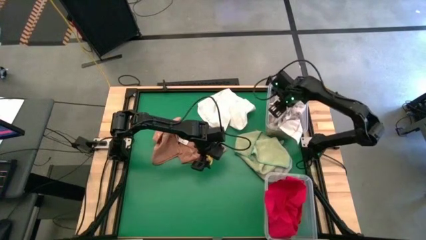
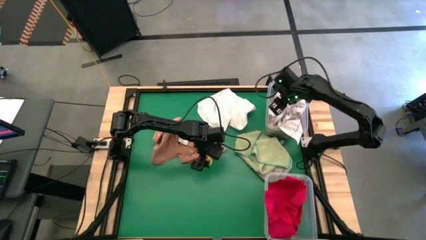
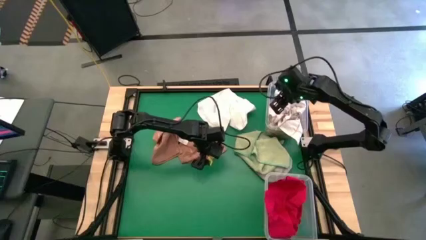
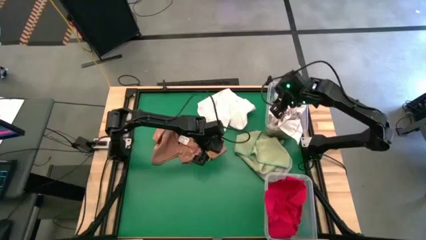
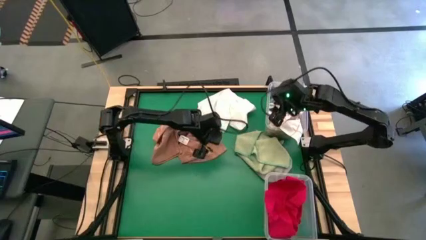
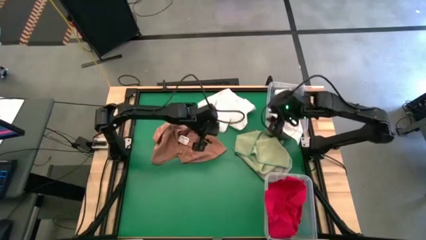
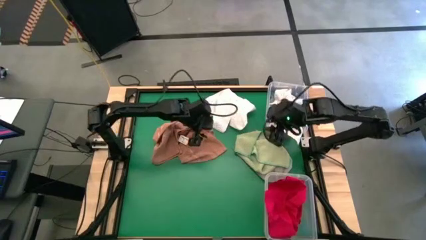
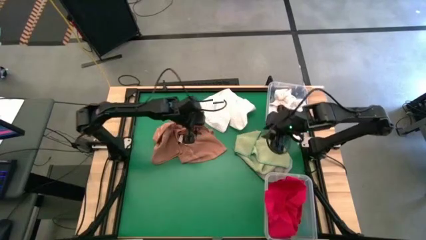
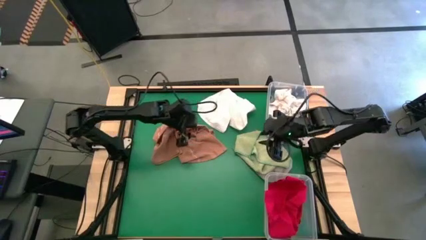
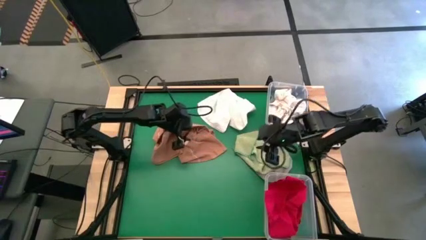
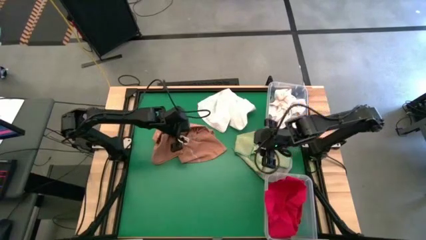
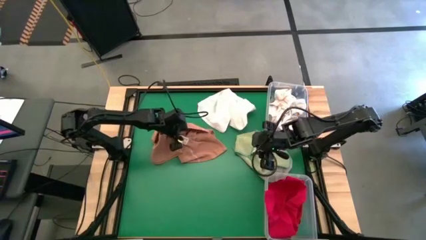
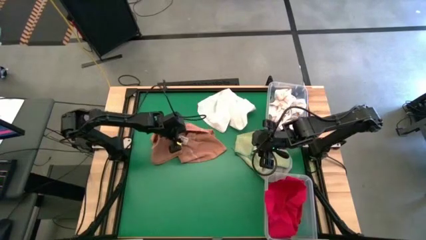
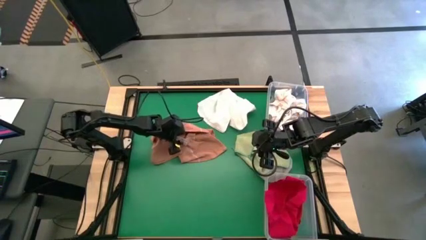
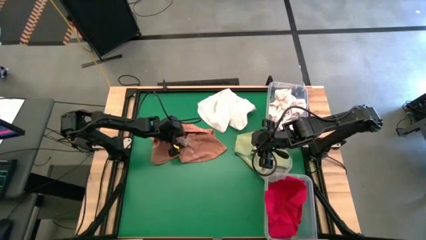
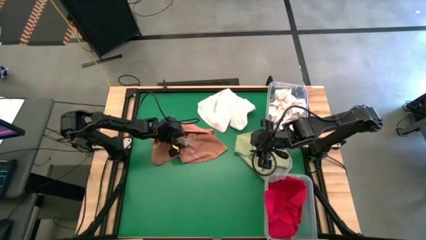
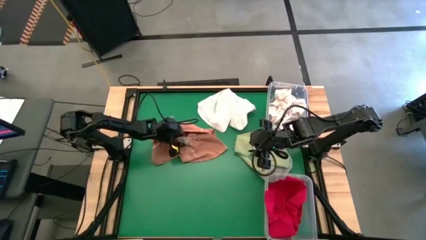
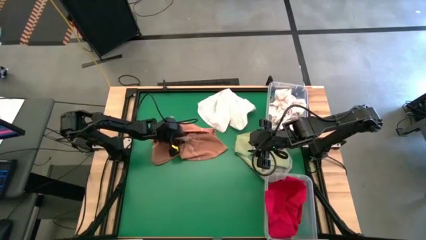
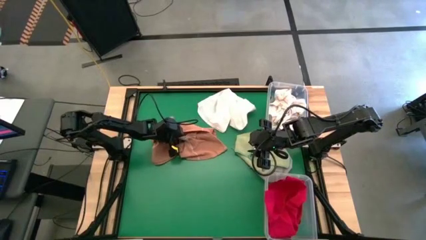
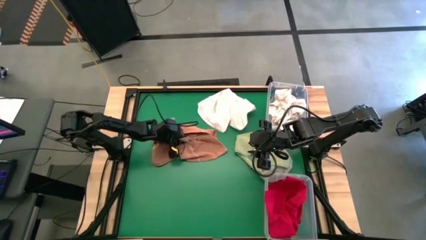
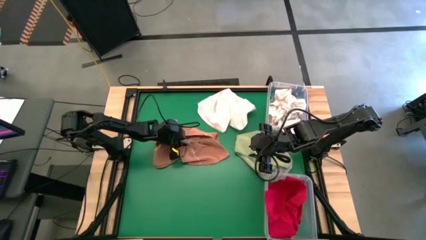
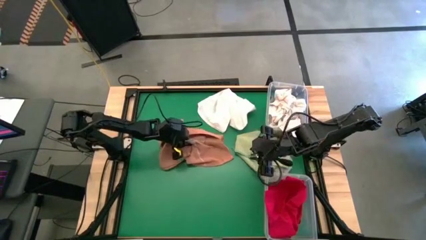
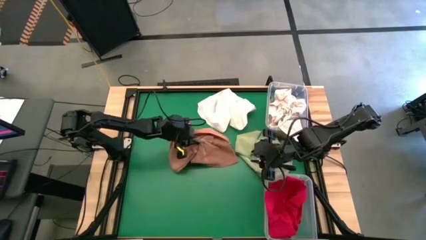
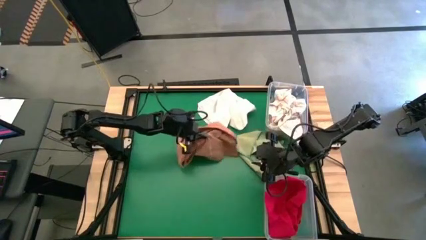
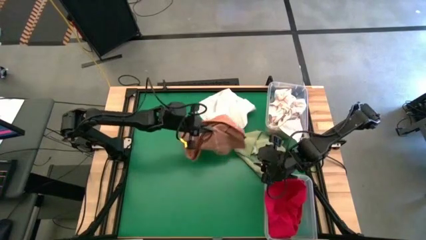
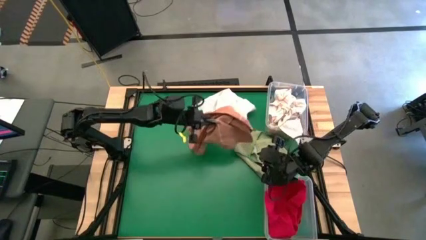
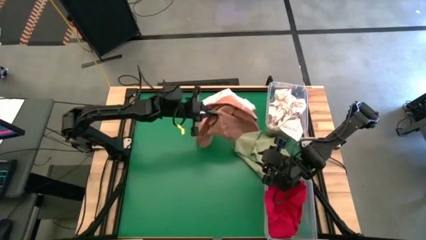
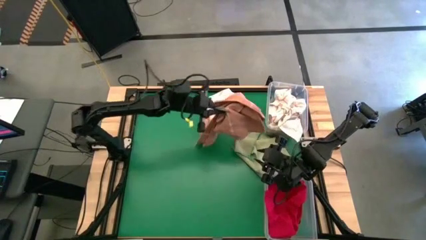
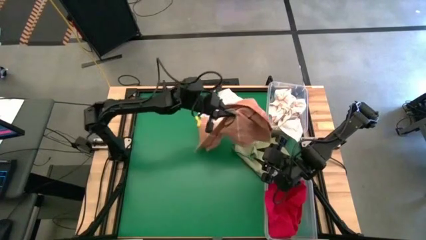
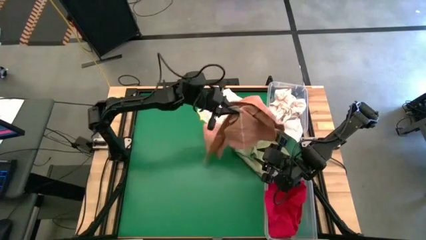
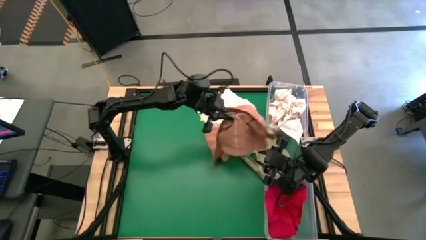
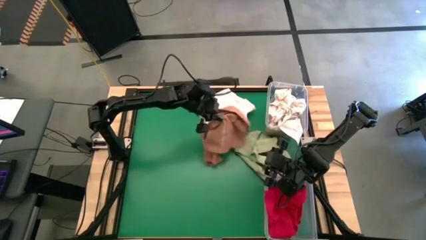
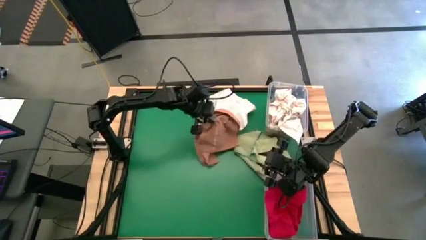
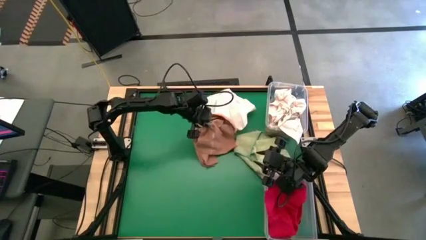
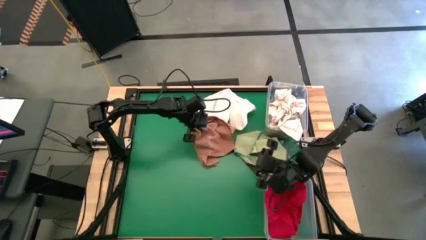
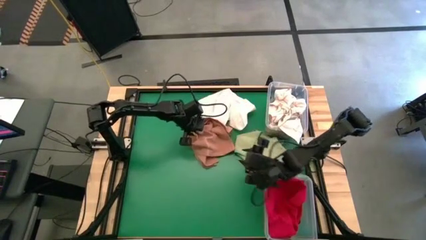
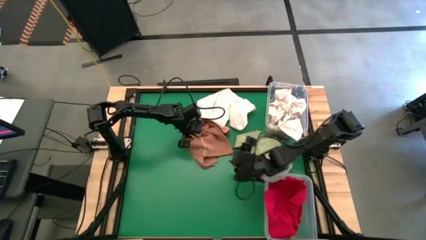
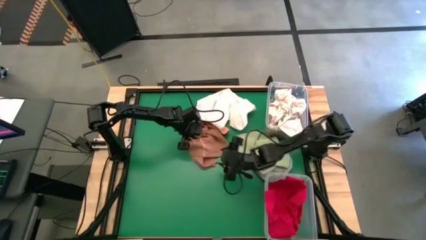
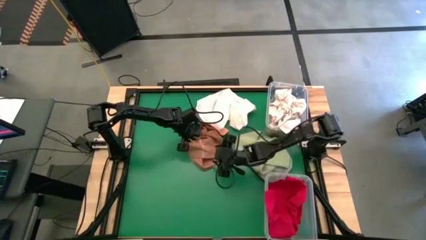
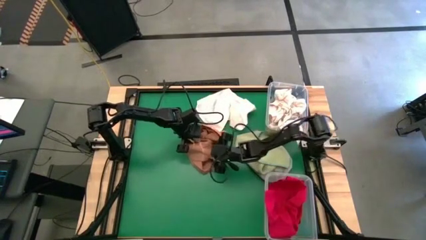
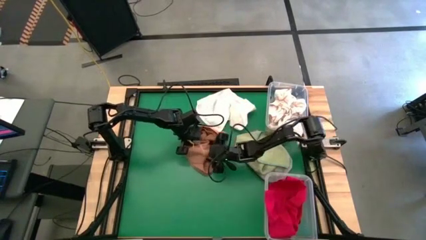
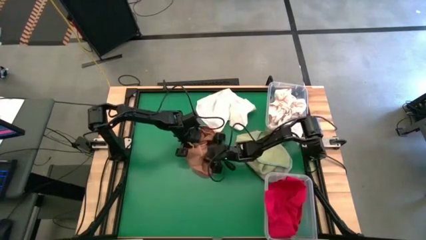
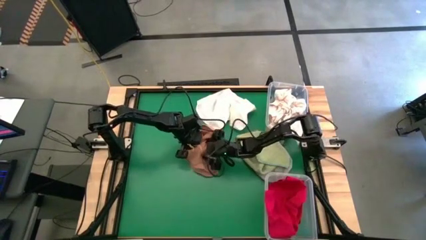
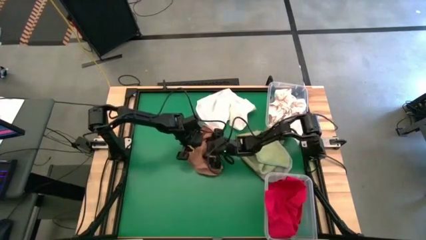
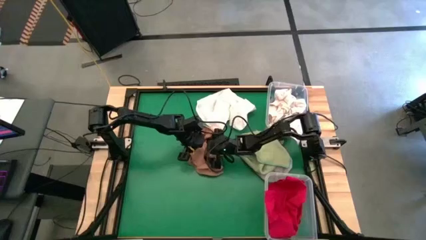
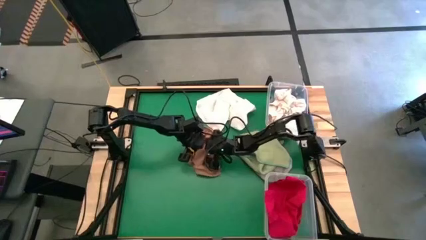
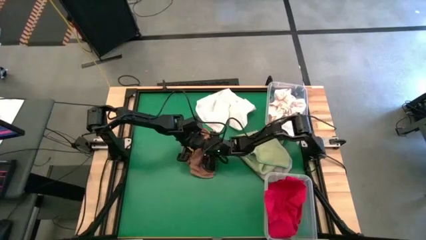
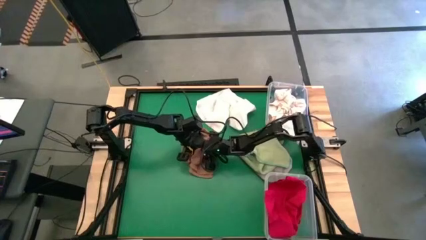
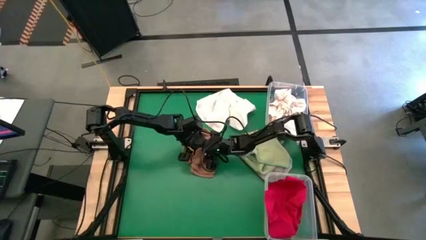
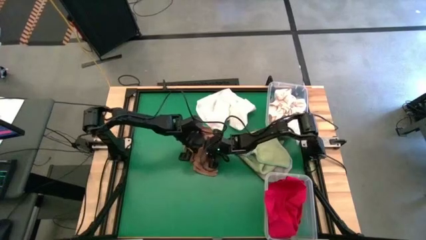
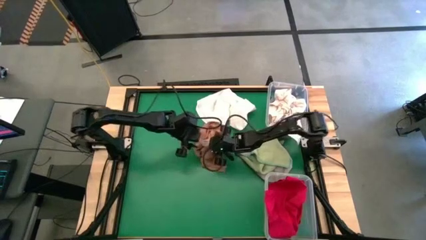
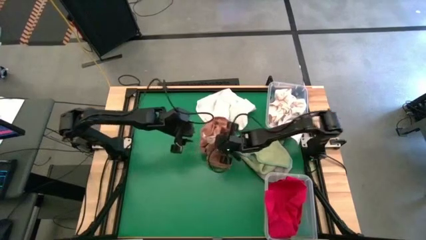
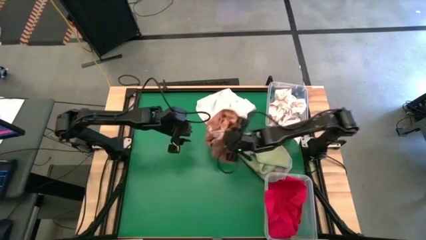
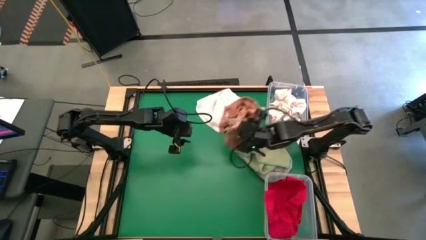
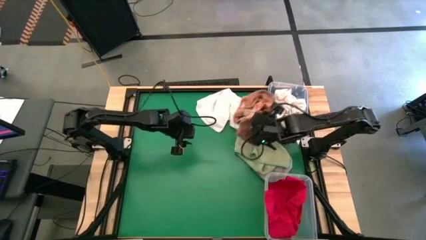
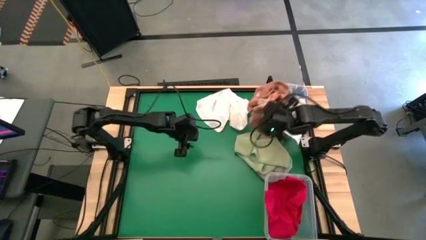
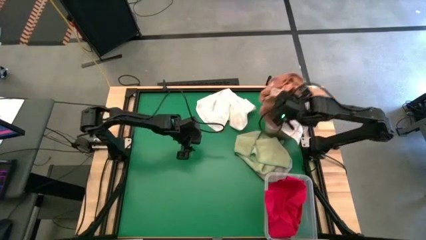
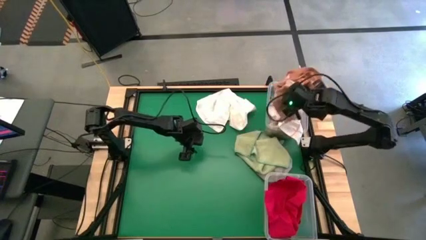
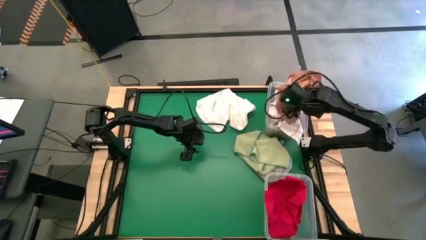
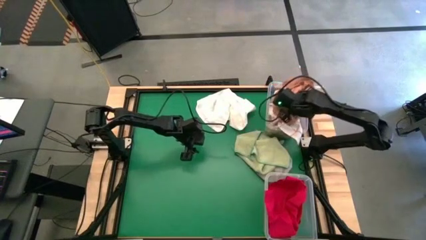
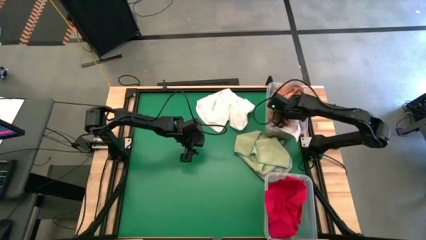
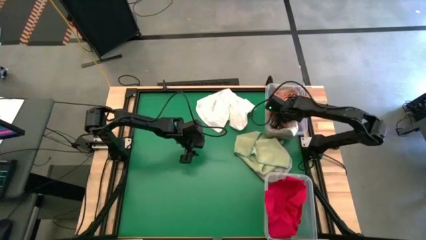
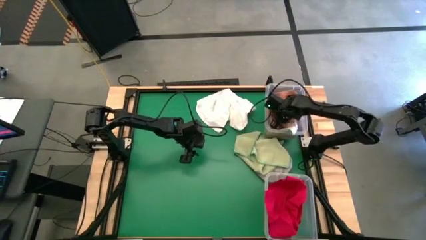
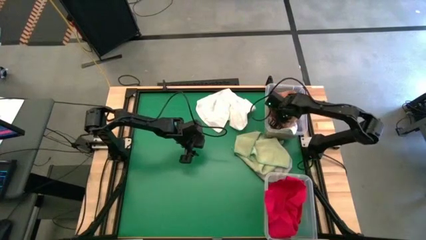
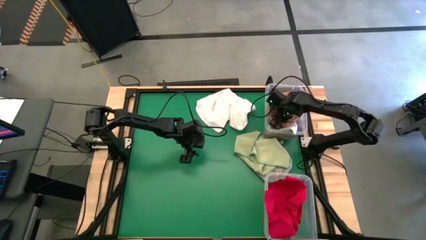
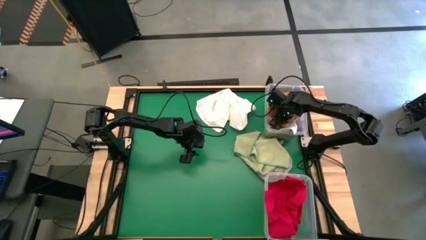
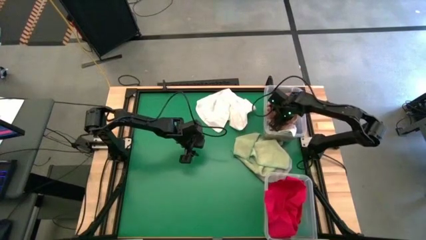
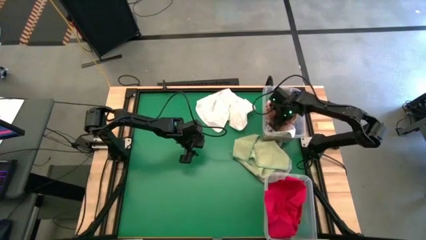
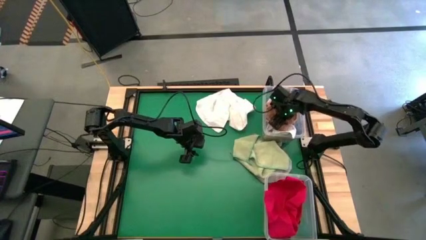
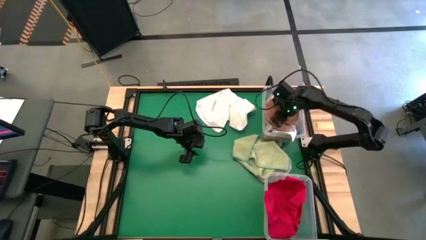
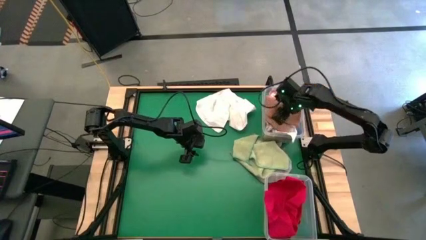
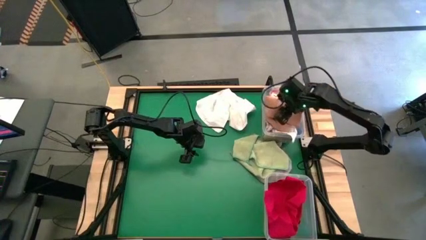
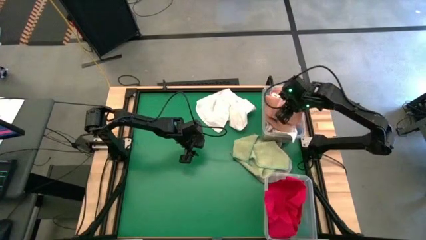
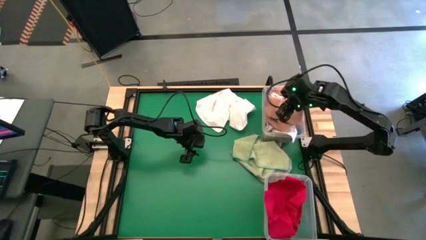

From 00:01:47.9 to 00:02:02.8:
Task: Sort towels by color in basket
Put the patterned light brown towel into the top transparent bin

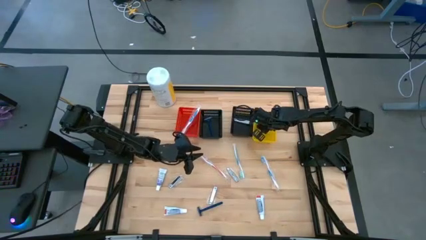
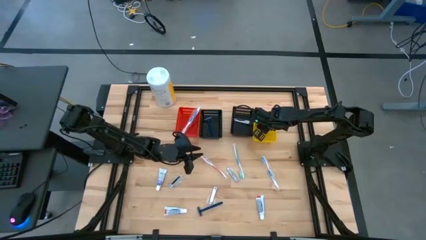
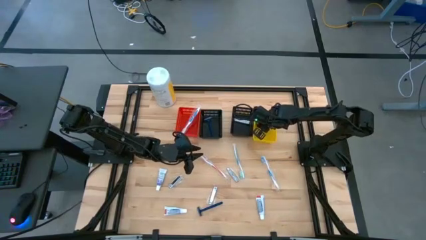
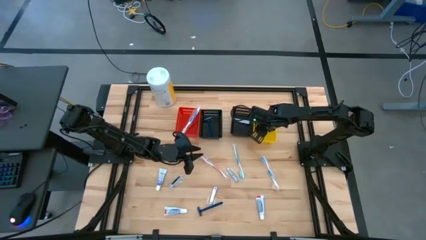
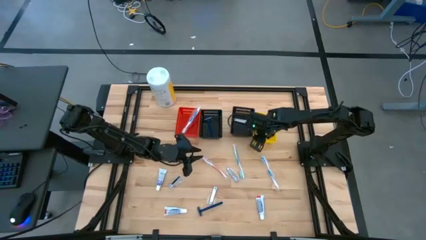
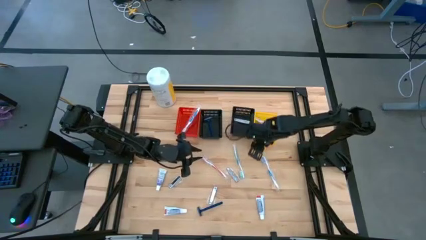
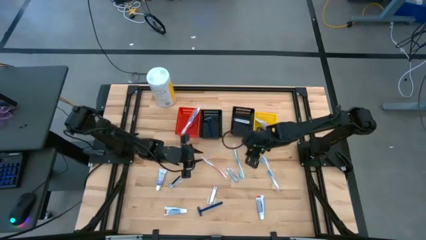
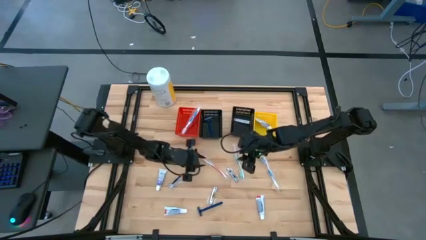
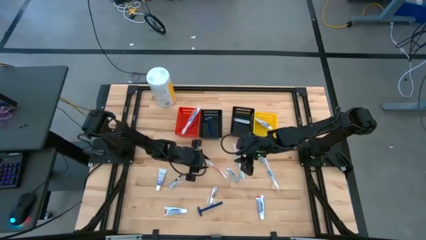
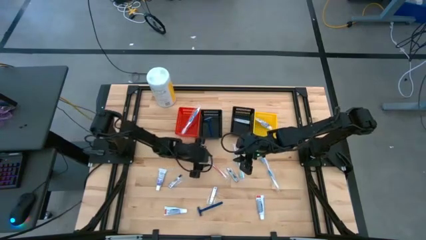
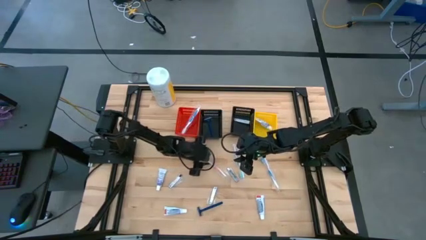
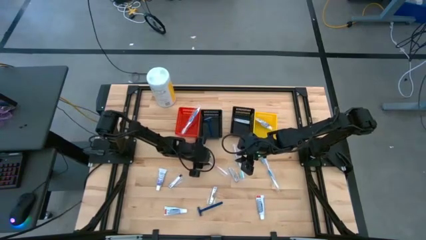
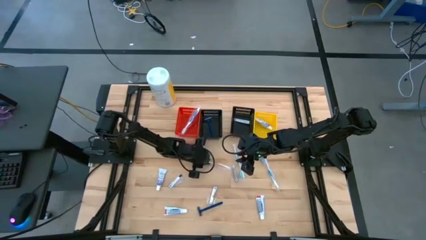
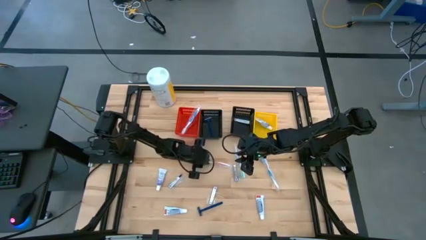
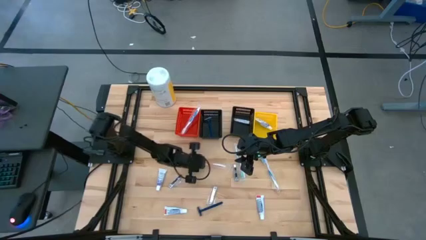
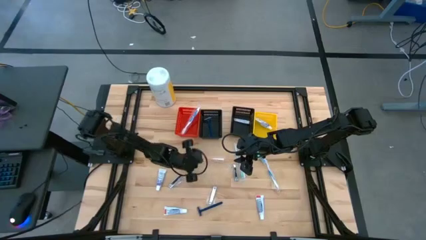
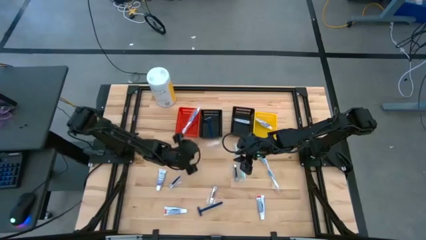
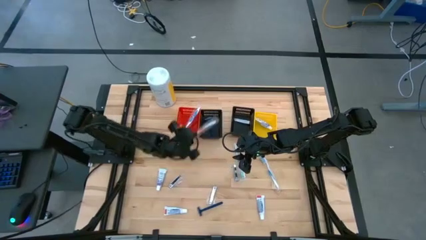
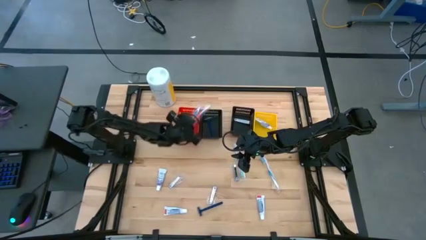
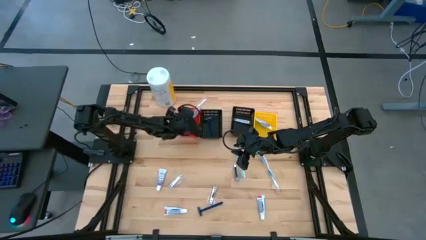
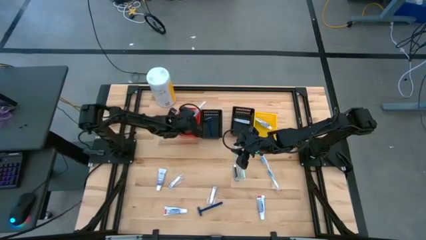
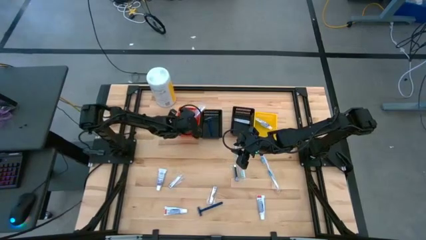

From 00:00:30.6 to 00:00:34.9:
Task: Pick & Place Travel size toiletries
Put the red toothbrush into the red basket
